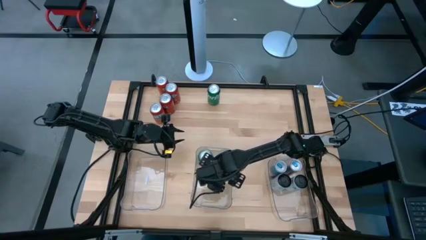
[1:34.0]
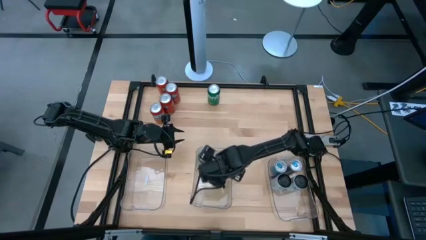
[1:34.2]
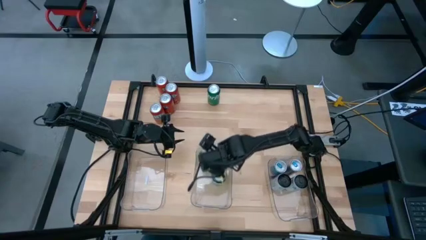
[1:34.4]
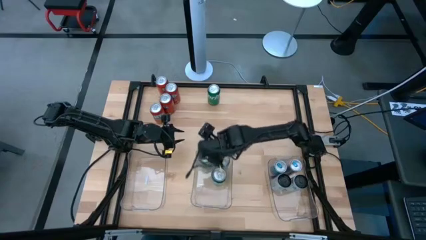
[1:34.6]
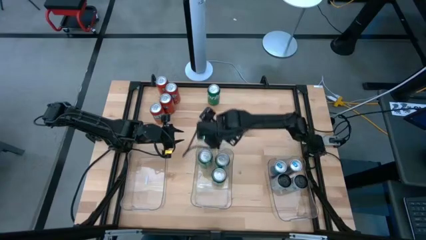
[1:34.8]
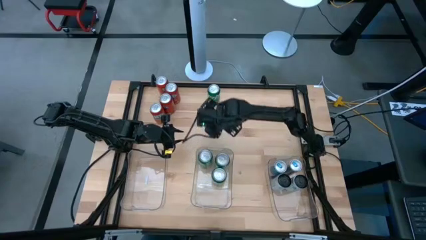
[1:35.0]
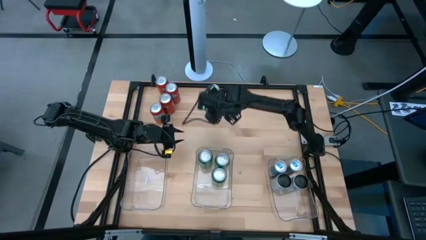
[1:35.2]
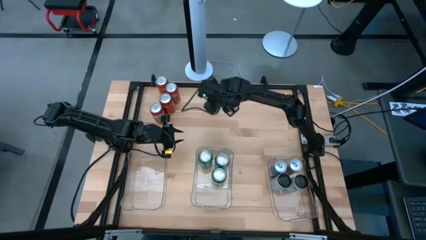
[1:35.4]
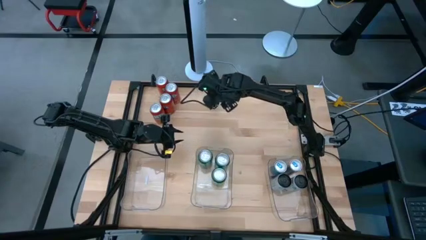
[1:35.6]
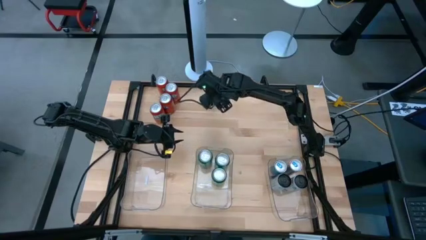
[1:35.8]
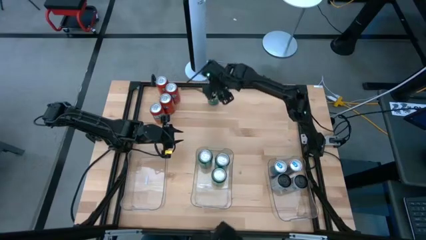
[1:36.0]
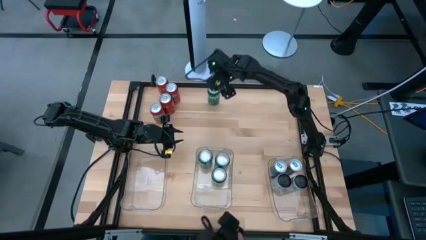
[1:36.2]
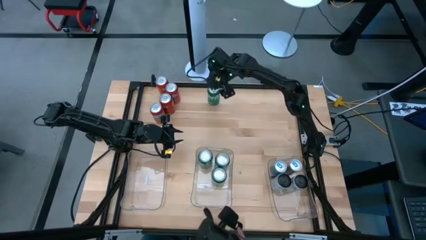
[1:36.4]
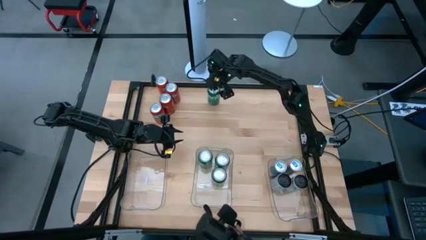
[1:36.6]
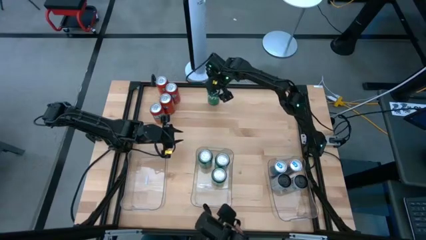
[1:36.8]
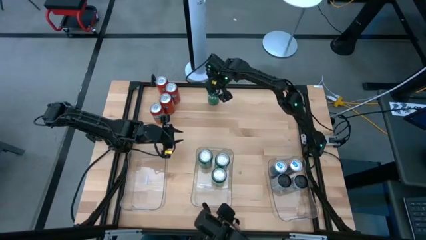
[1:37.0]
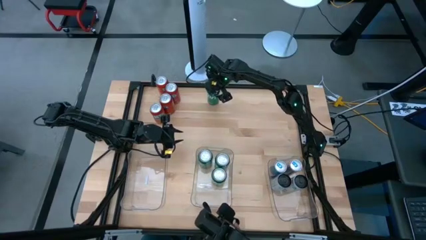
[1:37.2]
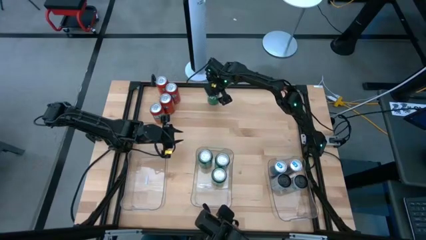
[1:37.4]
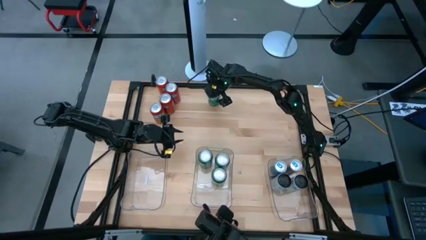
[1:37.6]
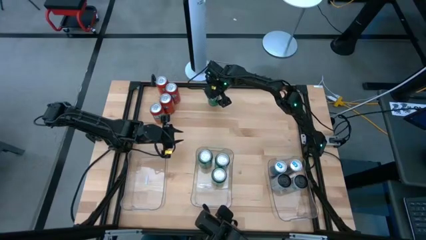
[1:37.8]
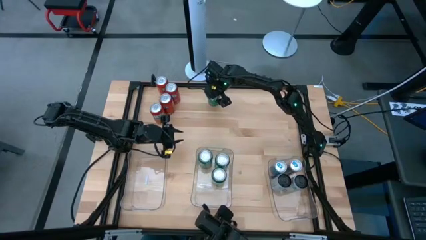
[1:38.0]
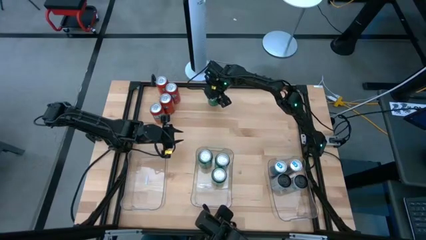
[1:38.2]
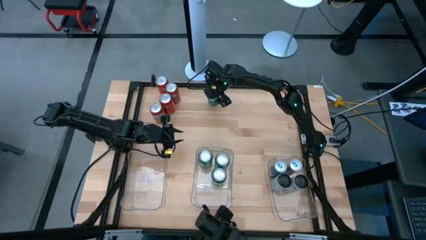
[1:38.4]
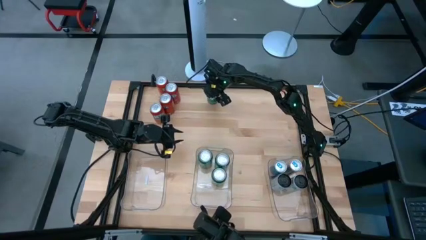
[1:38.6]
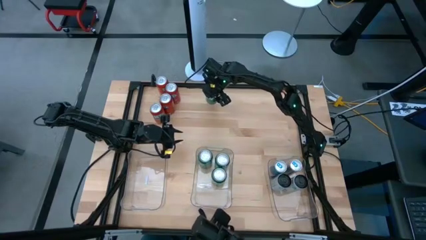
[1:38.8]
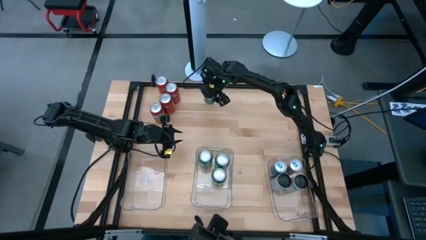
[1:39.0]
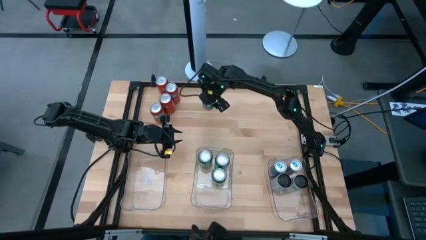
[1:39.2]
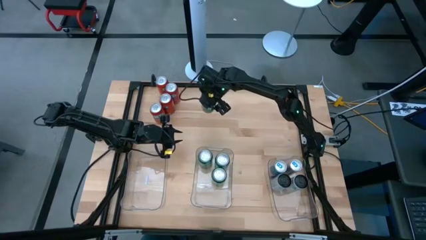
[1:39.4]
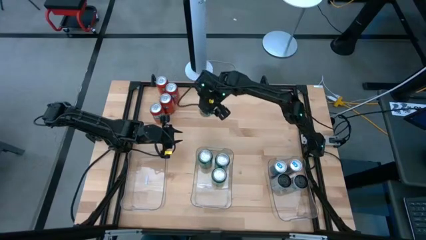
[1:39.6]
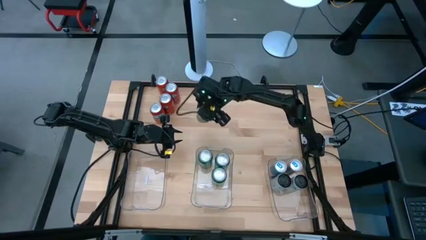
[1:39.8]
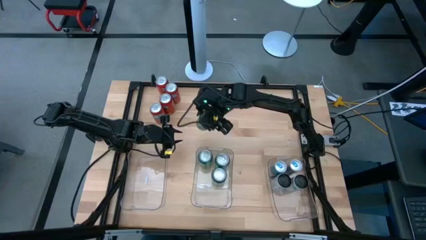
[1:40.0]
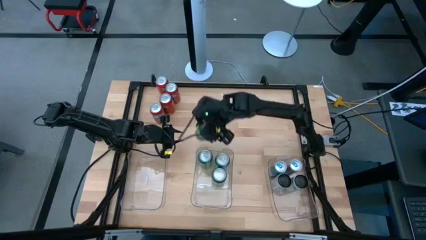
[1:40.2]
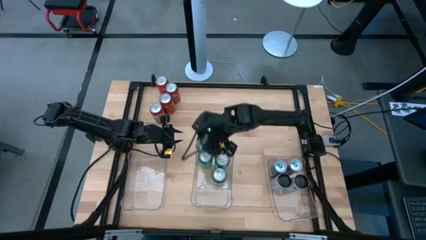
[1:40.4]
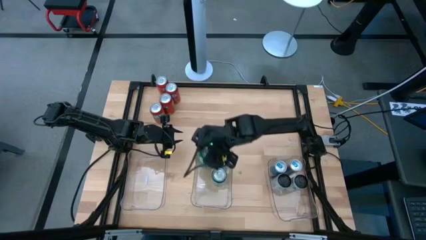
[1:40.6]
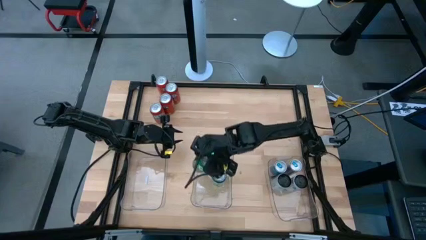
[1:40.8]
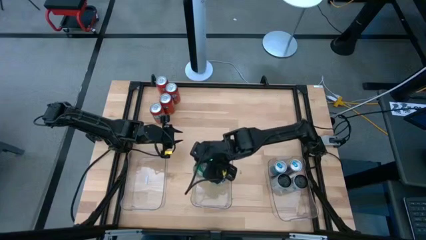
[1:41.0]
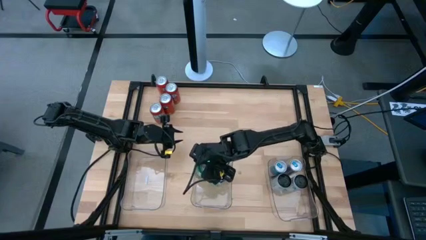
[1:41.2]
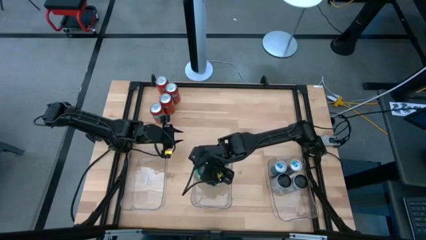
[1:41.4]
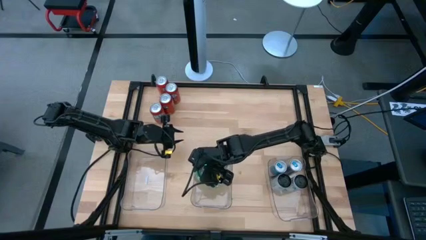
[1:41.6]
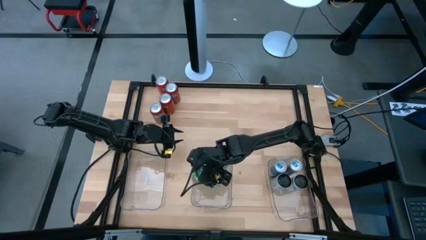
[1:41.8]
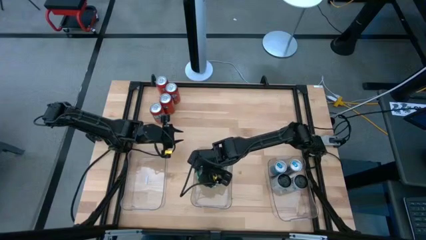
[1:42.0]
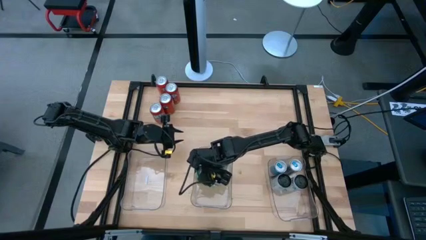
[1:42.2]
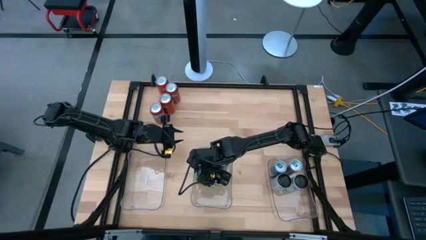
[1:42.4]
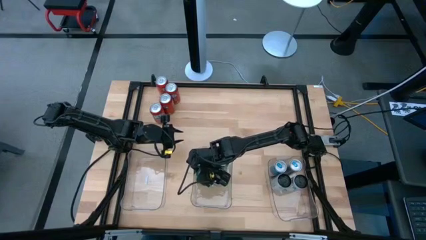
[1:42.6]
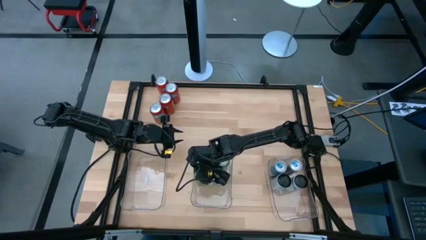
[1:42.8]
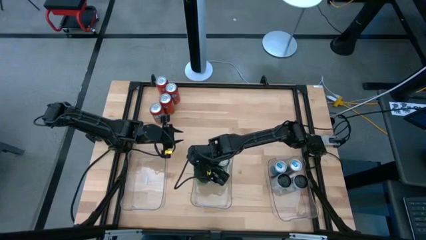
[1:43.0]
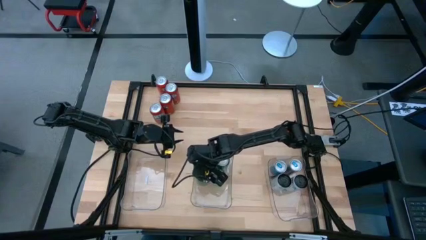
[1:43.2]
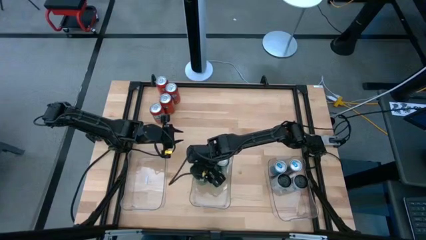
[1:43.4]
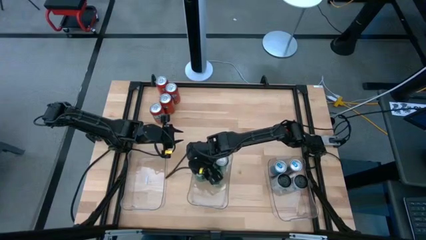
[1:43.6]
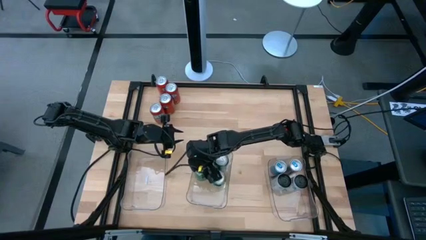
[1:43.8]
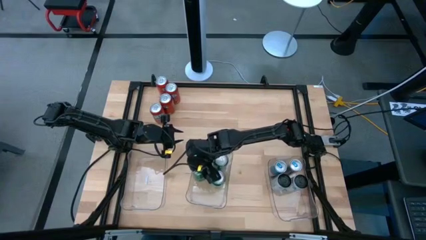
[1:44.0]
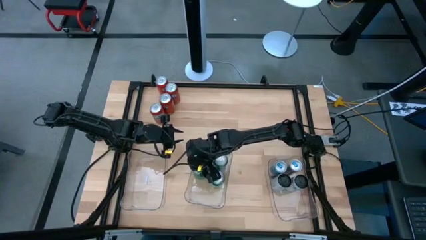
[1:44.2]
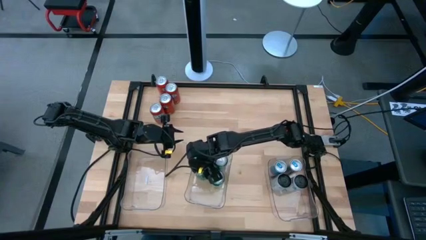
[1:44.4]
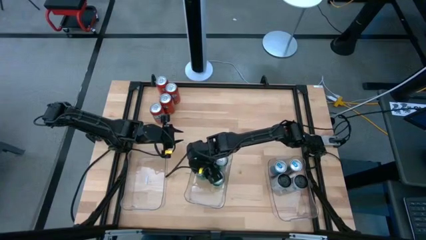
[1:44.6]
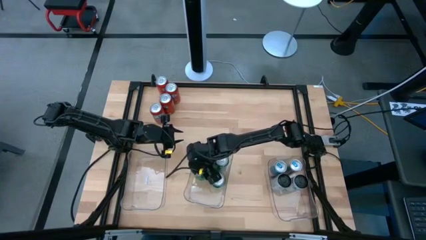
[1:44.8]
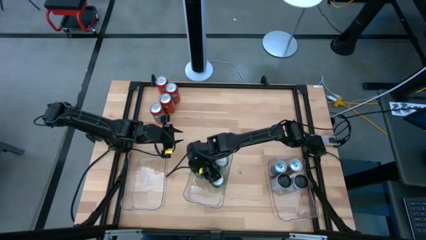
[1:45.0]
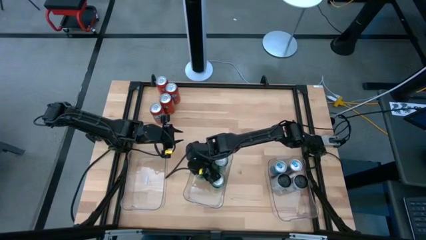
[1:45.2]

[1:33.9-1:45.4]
Task: Sort soda cans
Put the green soda can into the center transparent bin
